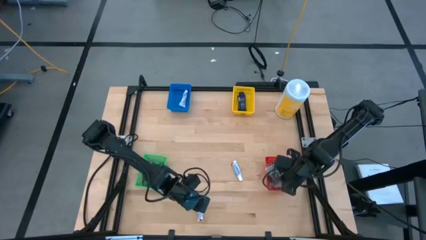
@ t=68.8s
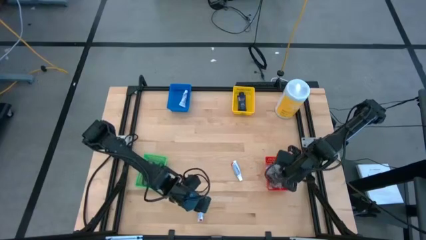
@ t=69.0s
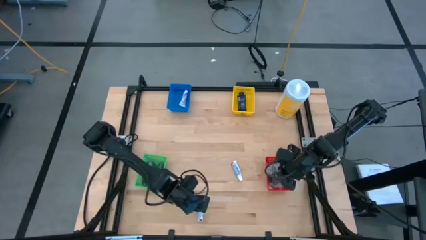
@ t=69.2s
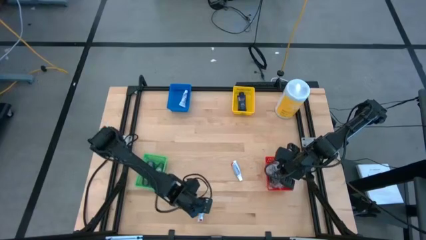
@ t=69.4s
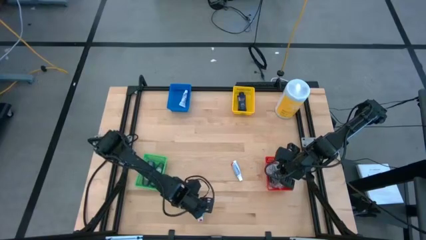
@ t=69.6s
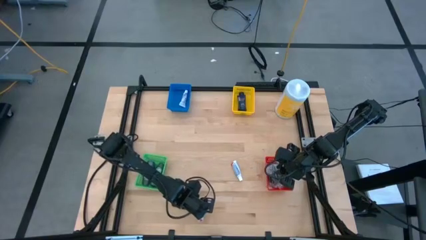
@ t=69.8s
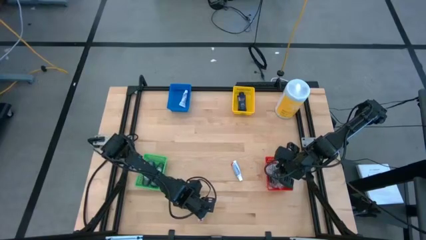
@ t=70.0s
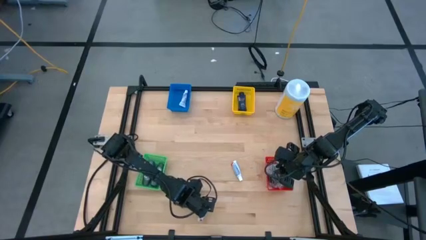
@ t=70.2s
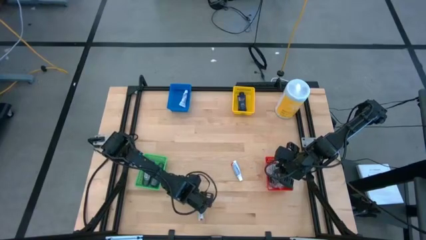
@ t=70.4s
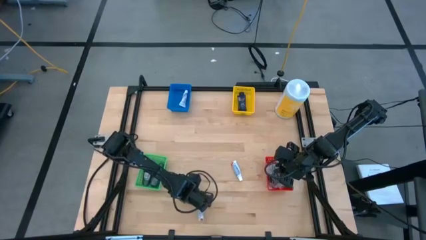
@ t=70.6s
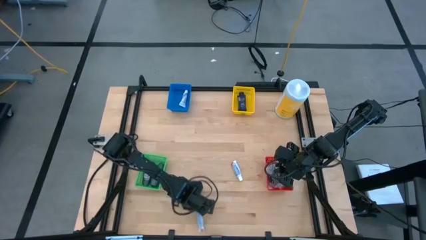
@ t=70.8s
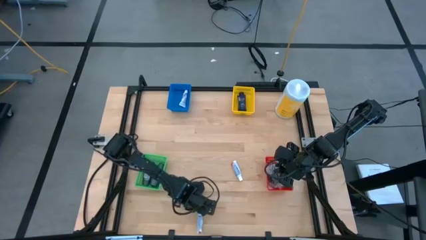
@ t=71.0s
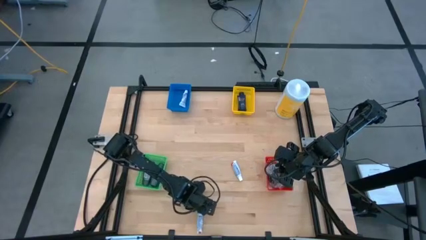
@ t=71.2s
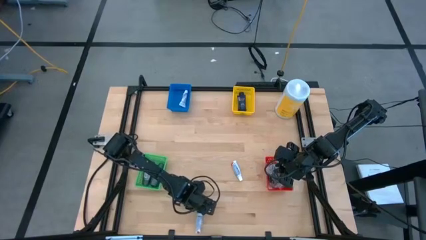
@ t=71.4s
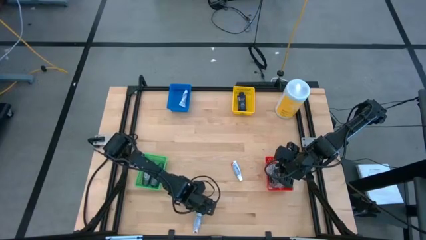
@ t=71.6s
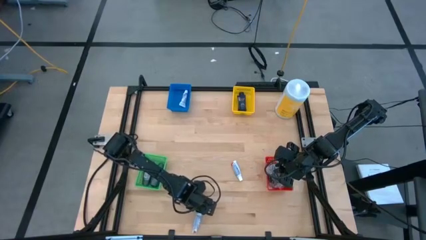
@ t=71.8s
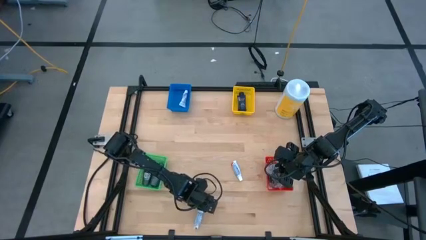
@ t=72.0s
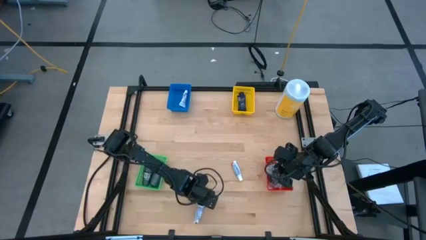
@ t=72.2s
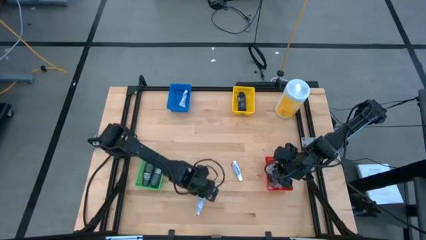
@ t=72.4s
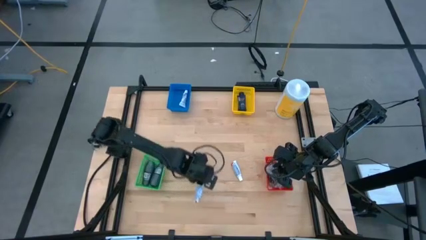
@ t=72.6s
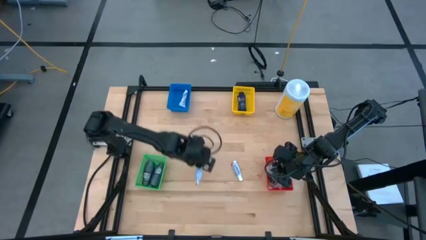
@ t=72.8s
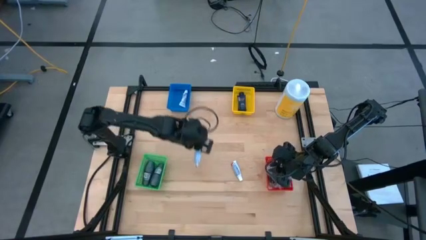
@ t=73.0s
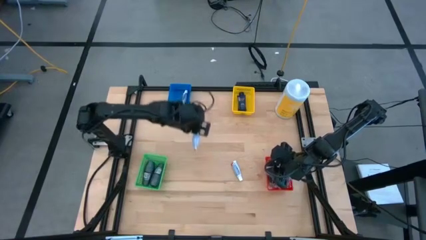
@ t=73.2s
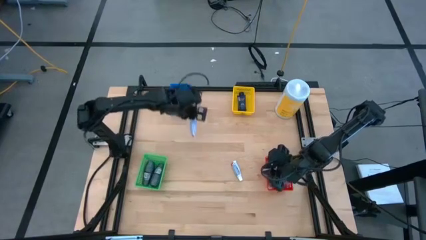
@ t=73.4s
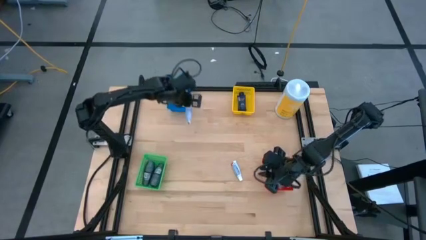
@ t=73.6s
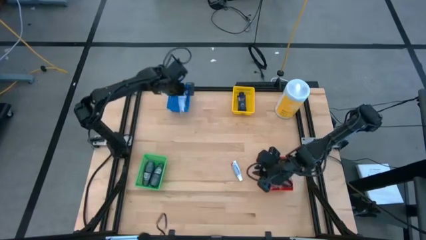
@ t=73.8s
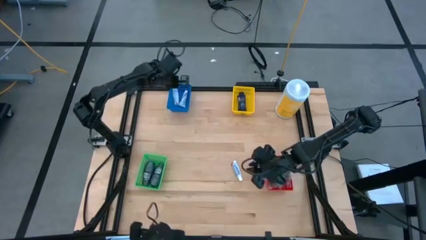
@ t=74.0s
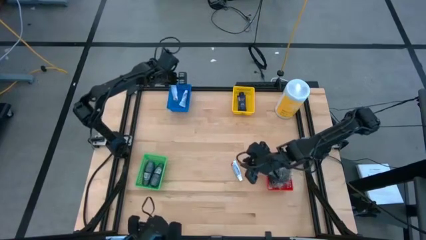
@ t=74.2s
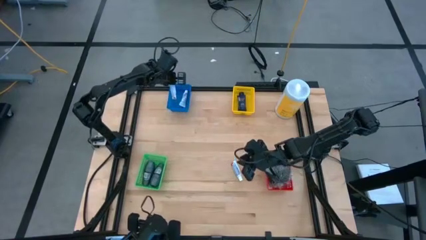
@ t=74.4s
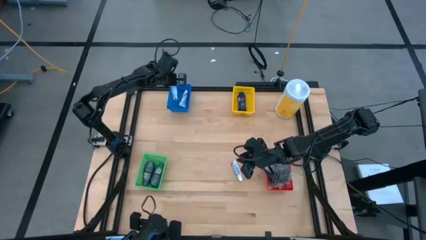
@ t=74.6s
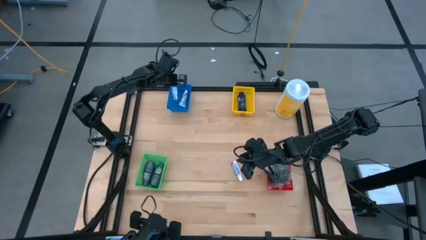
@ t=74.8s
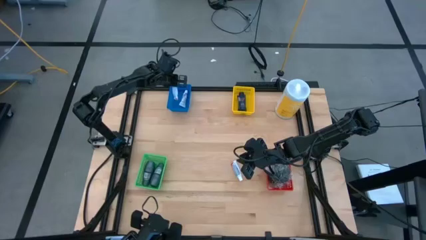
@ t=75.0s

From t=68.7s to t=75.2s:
Task: Pick & Place Travel size toiletries
Put the toothpaste into the blue basket

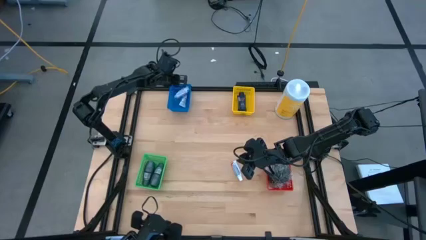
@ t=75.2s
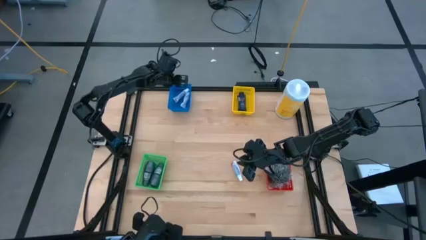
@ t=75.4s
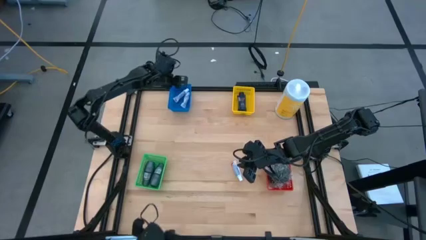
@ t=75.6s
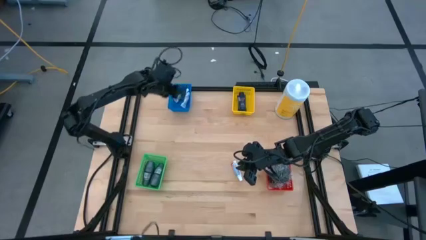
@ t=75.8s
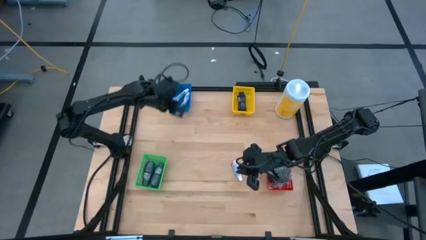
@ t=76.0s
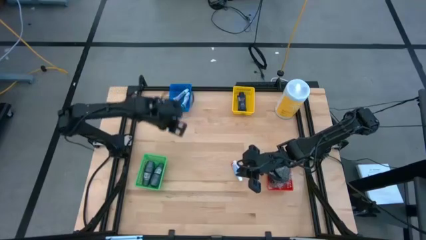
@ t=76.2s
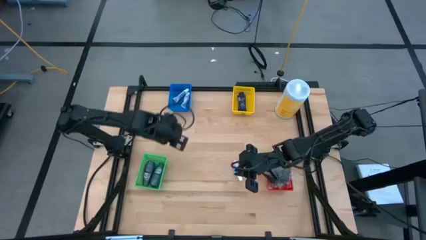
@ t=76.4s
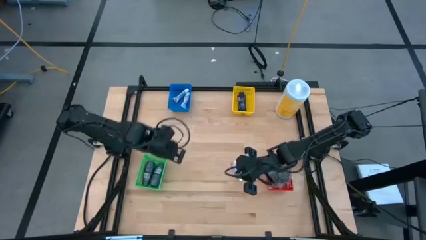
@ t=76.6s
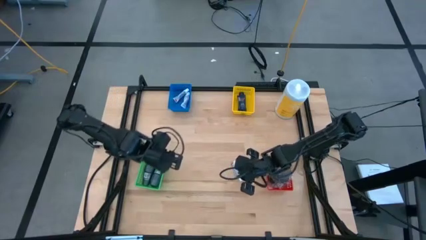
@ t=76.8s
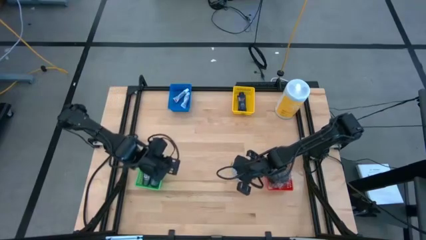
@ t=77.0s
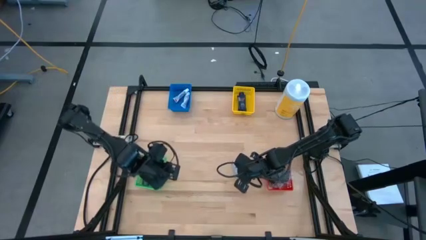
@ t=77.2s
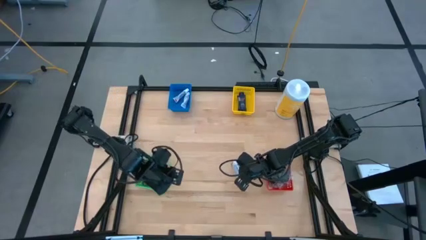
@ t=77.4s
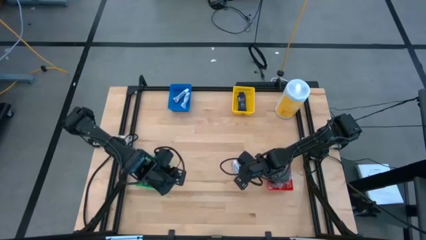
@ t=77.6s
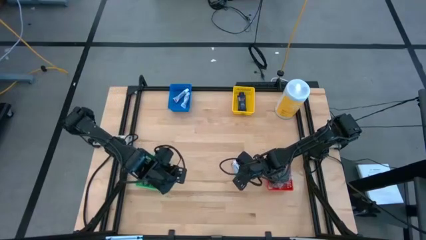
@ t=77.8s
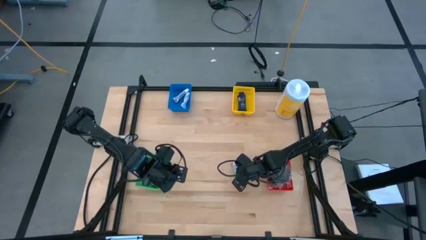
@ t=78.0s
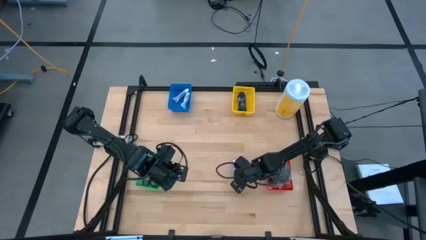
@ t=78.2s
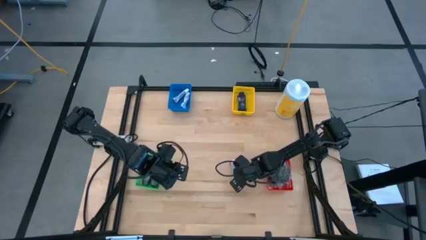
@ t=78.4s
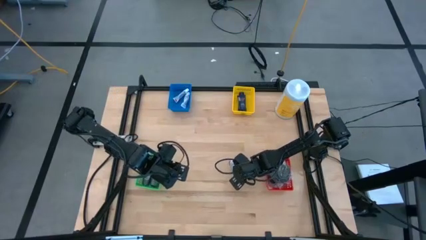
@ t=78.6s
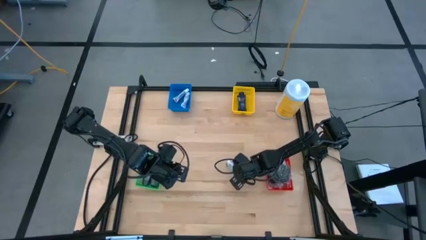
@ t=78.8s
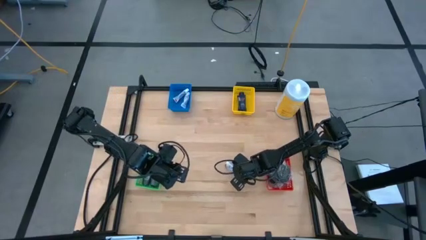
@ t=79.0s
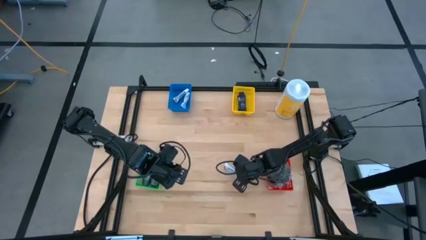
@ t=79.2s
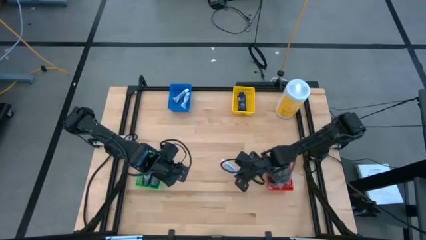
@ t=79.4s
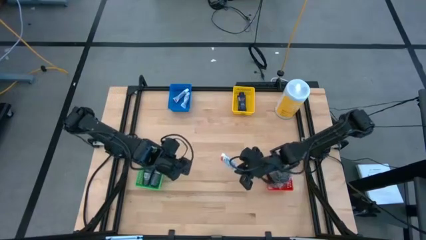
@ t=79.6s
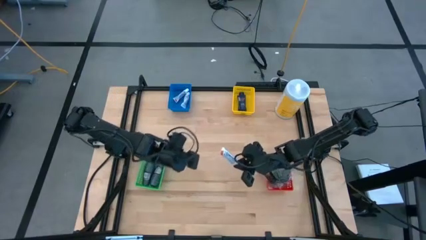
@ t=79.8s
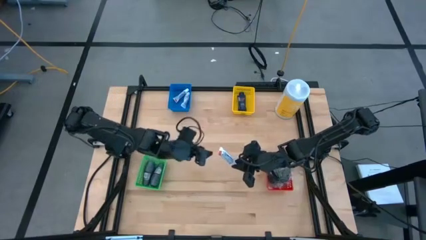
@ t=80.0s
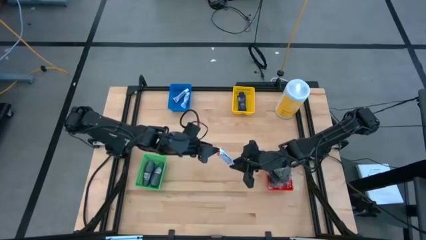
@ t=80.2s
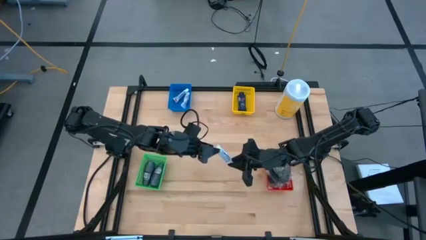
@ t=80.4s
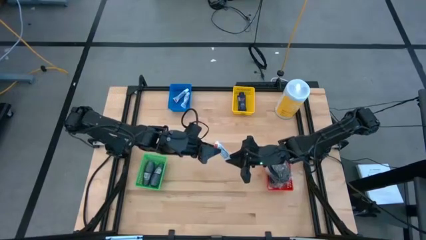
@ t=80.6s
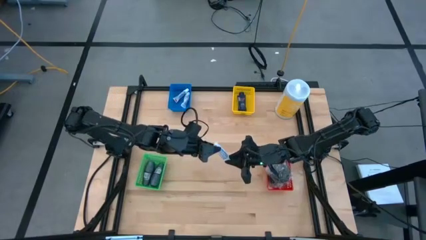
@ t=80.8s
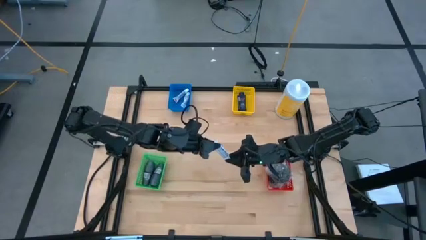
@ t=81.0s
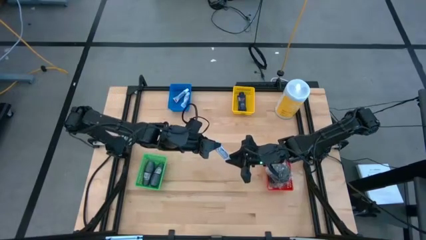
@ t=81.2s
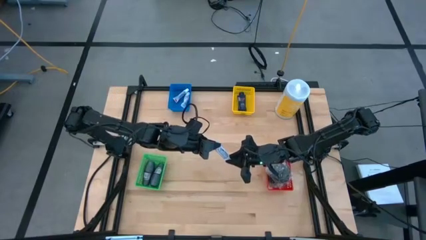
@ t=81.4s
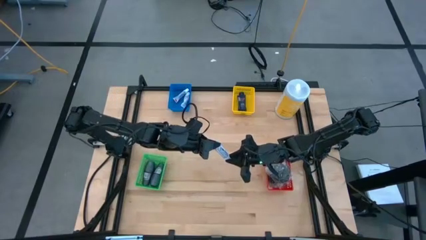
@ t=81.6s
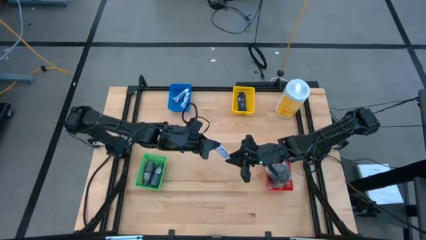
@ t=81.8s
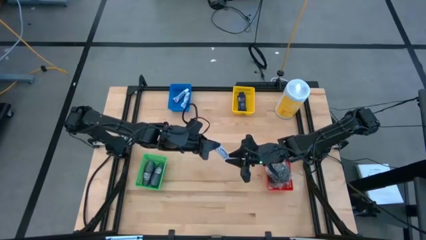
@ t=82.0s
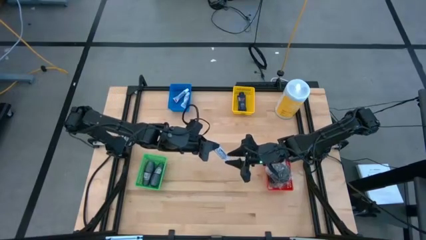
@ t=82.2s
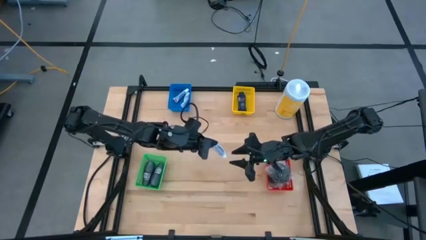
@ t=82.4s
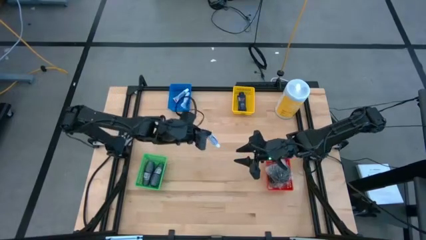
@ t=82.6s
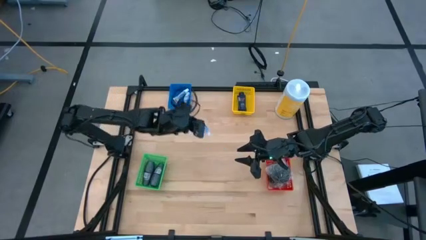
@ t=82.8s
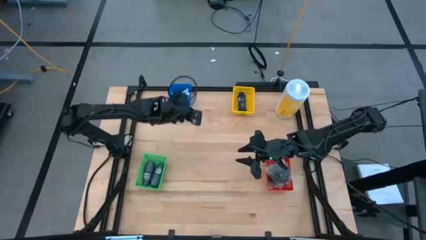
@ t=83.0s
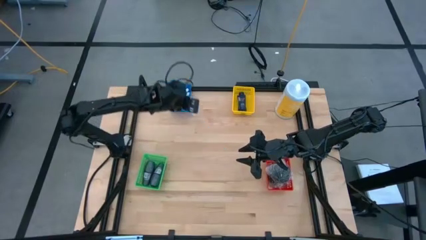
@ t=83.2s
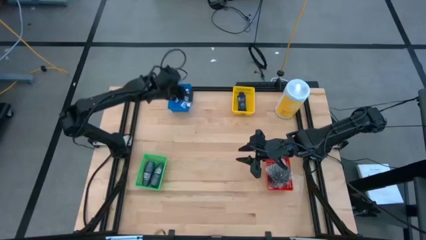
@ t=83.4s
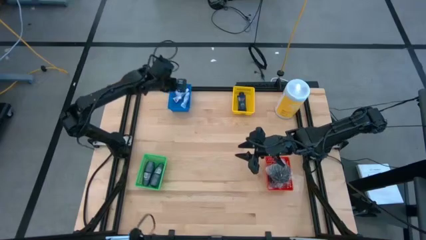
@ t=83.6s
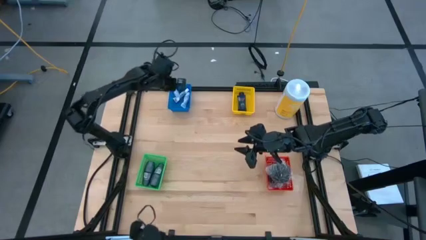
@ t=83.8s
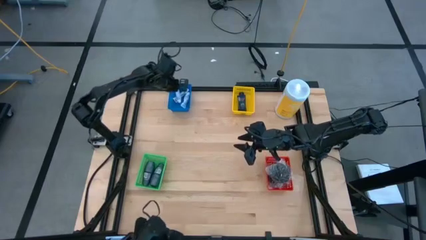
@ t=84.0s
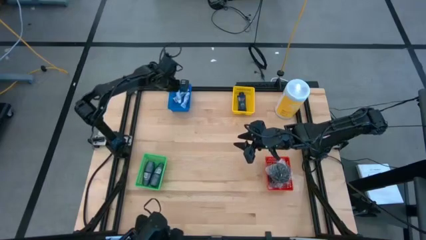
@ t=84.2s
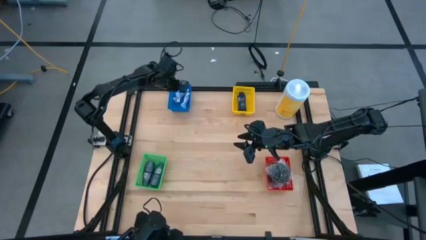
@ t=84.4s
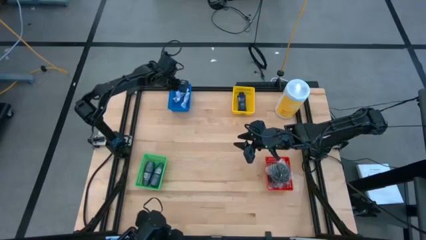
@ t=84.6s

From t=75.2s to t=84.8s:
Put the toothpaste into the blue basket
